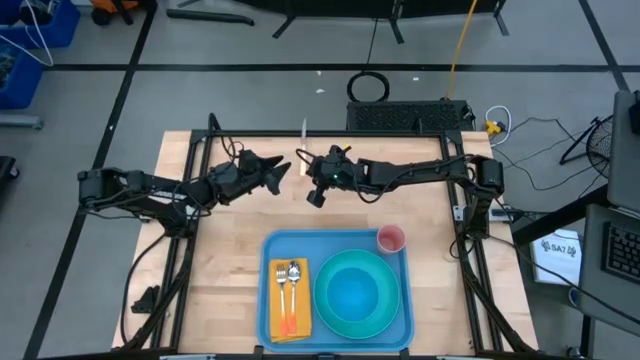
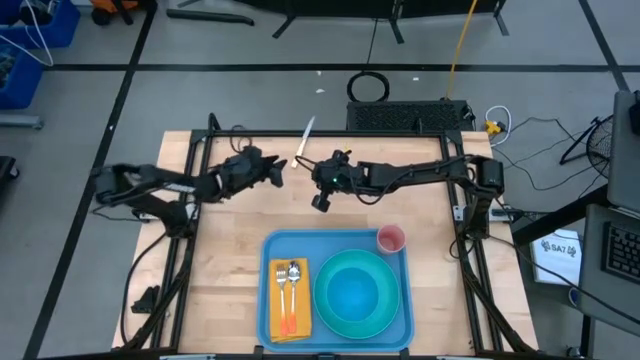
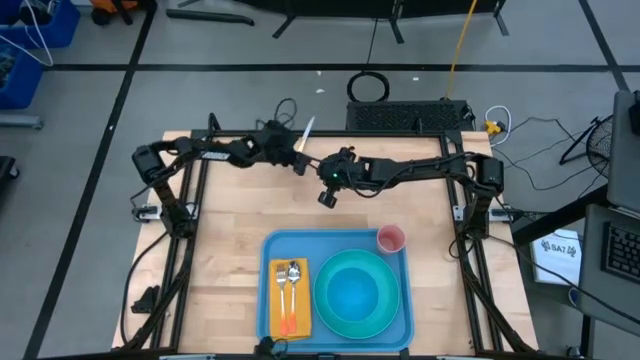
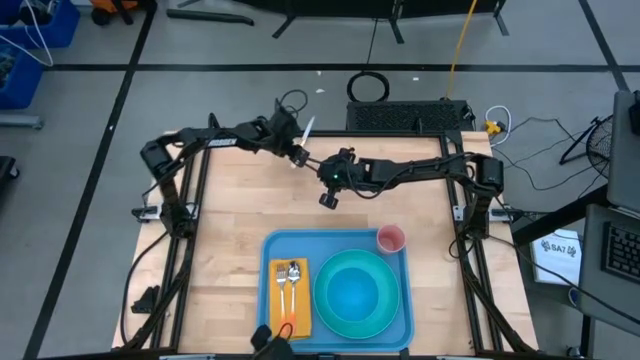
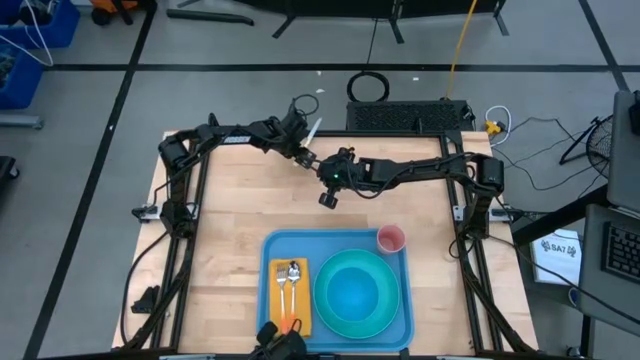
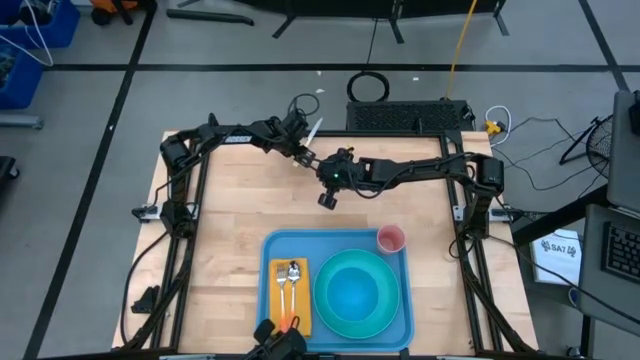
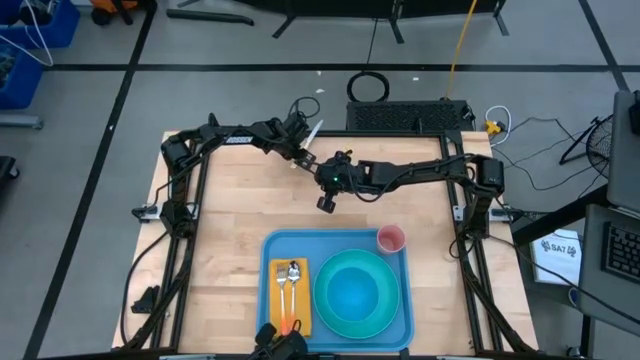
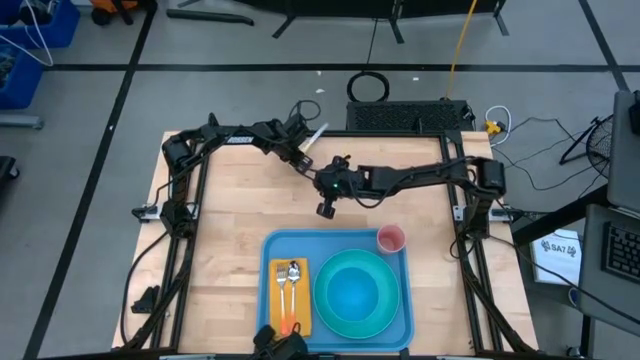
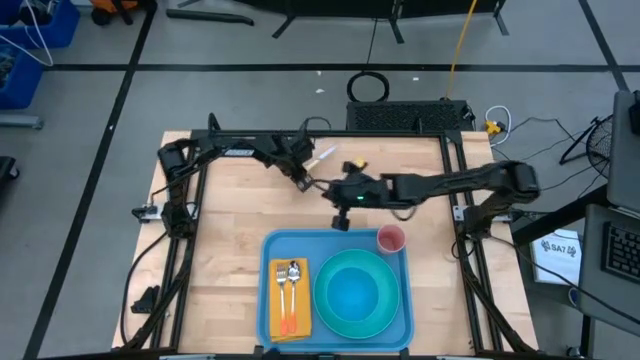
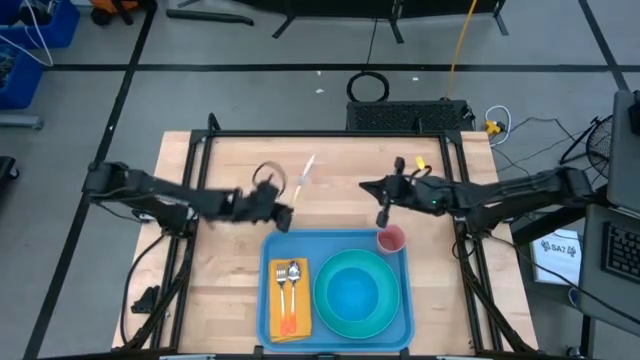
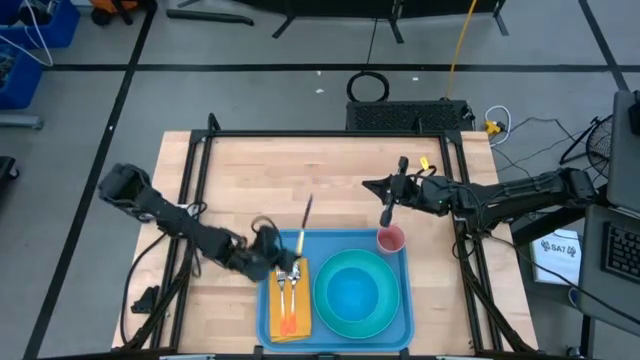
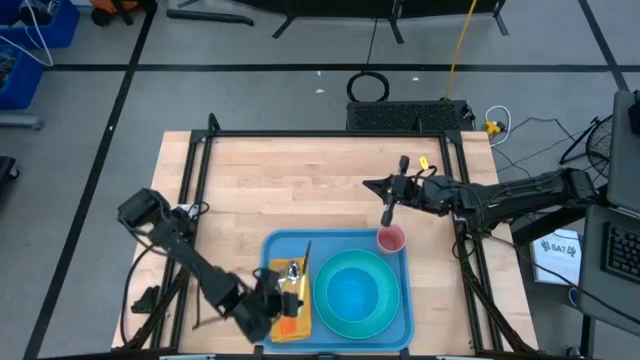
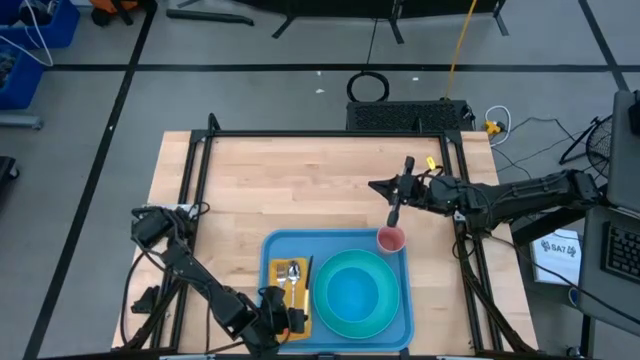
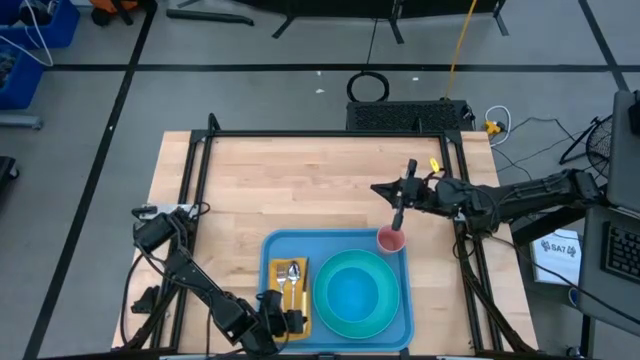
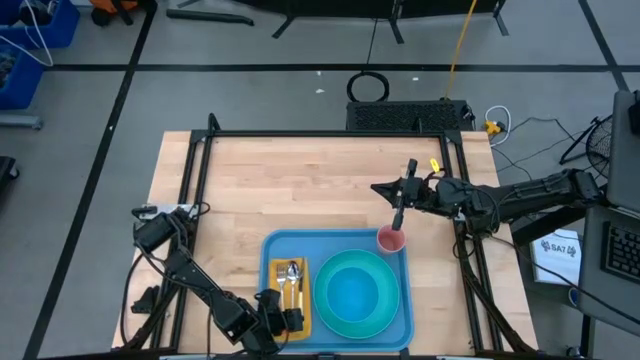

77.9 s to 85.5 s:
Task: Set up tray
Put the yellow table knife on the yellow table napkin beside the orange spoon

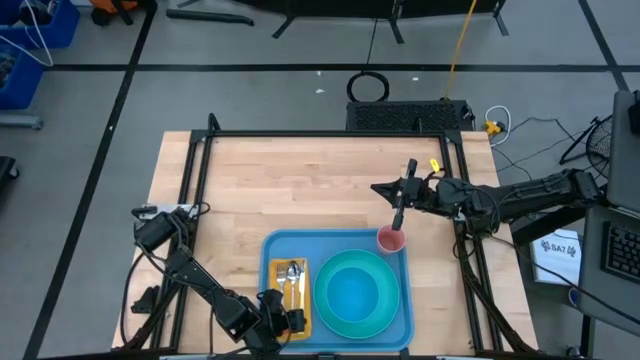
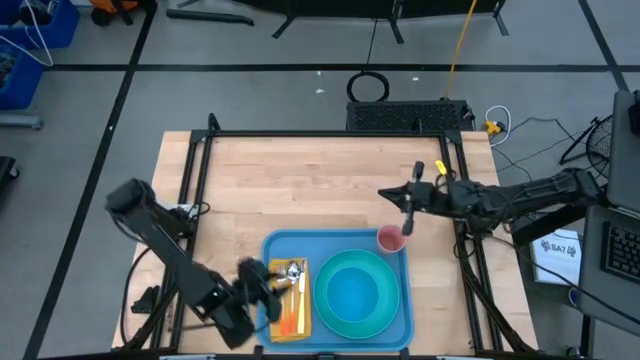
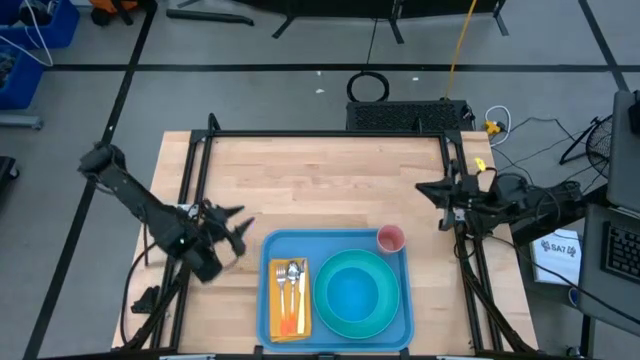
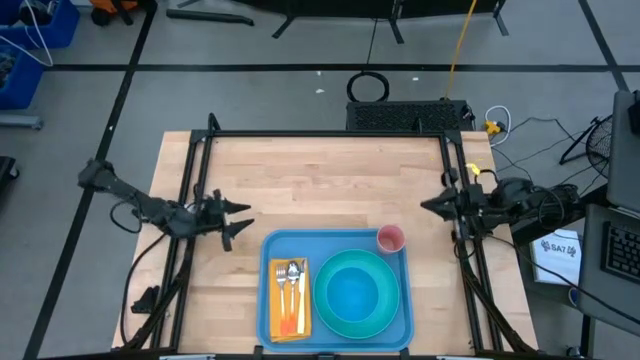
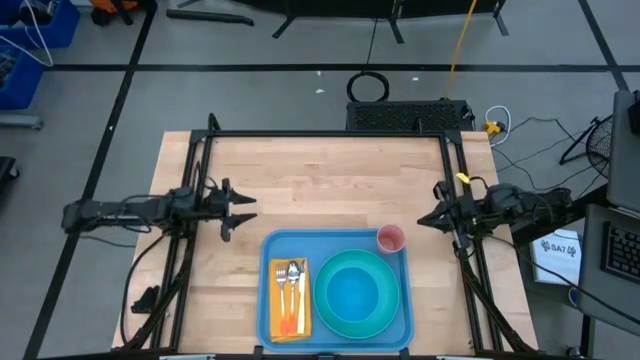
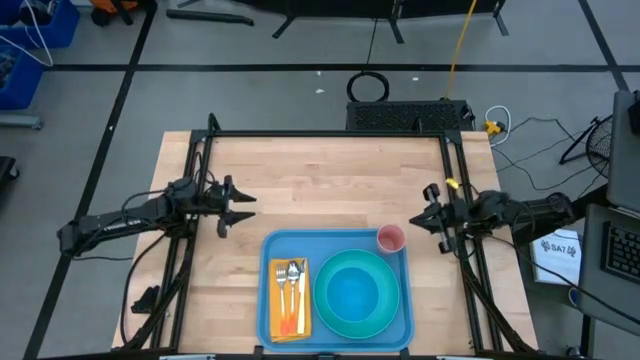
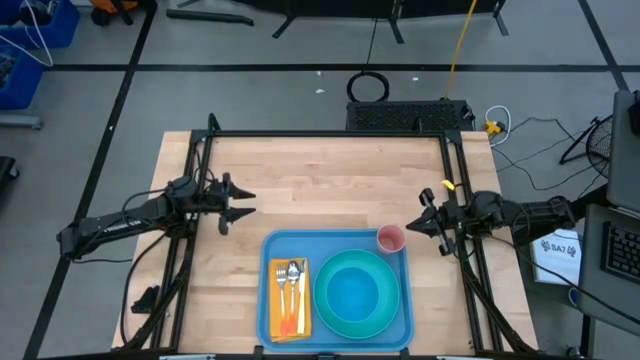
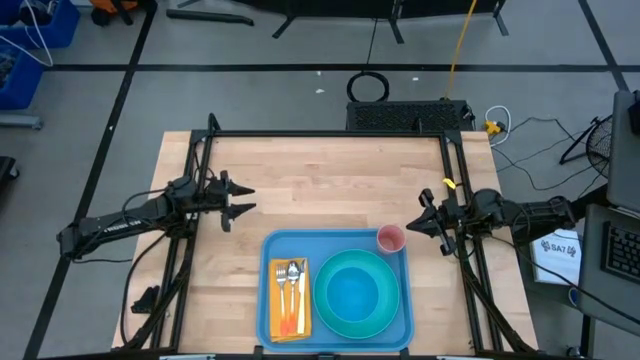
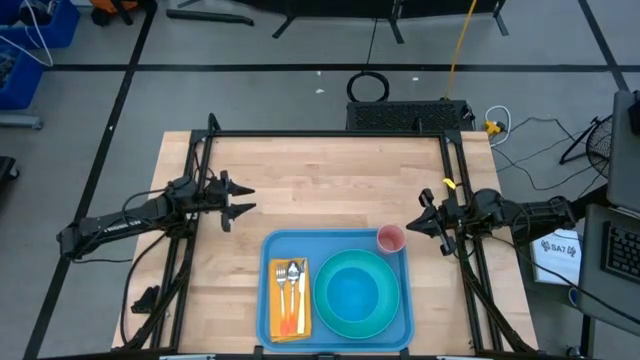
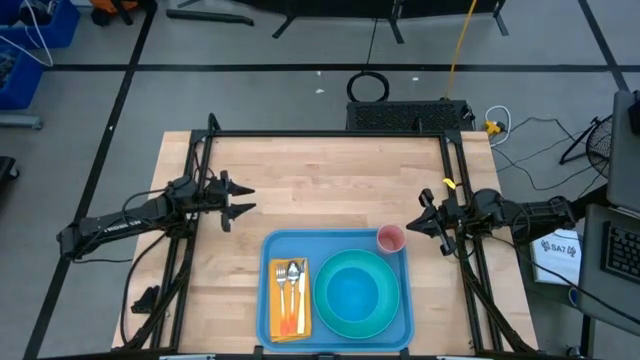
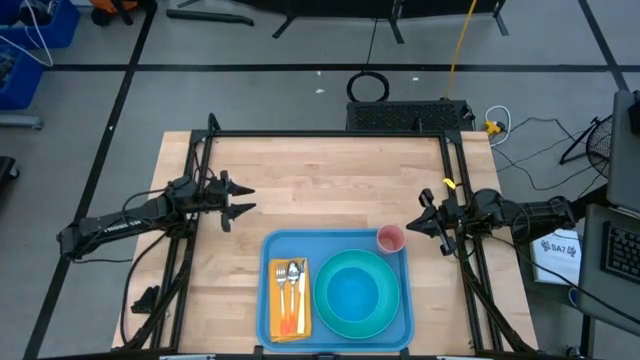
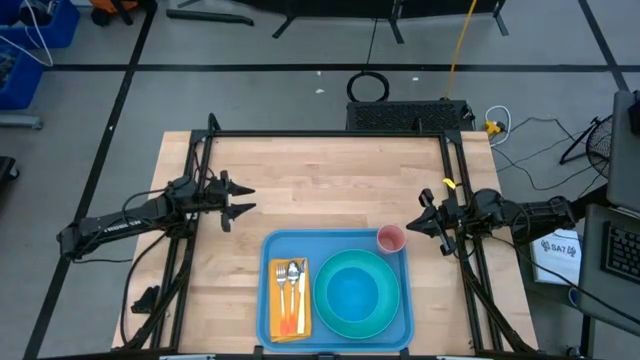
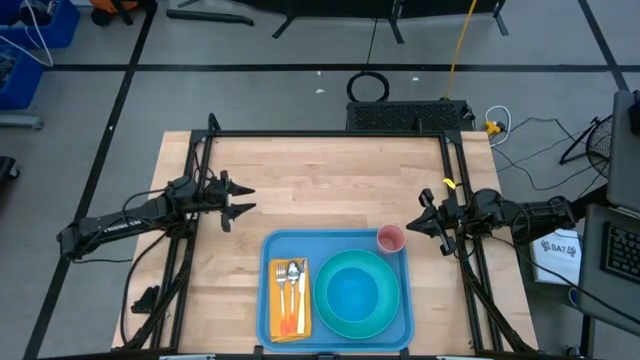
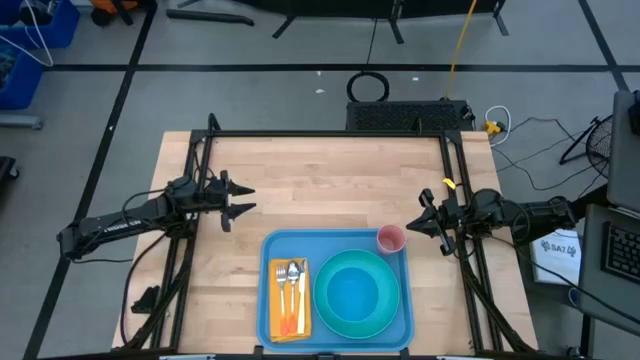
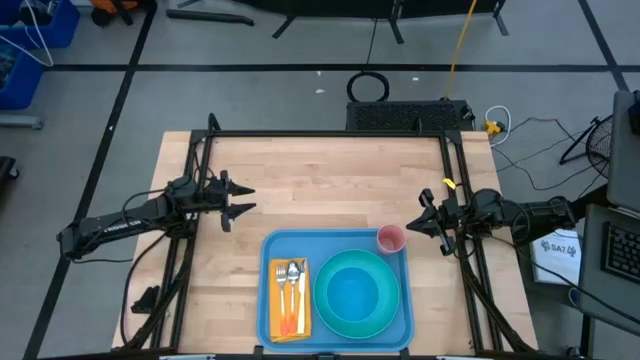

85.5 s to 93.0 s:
Return to Home Position

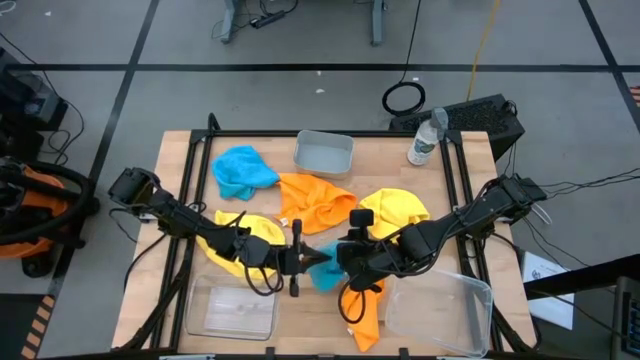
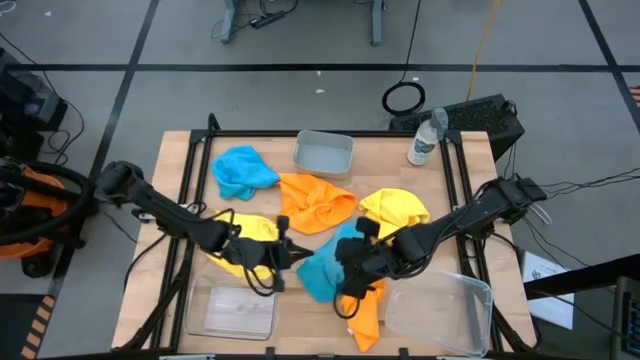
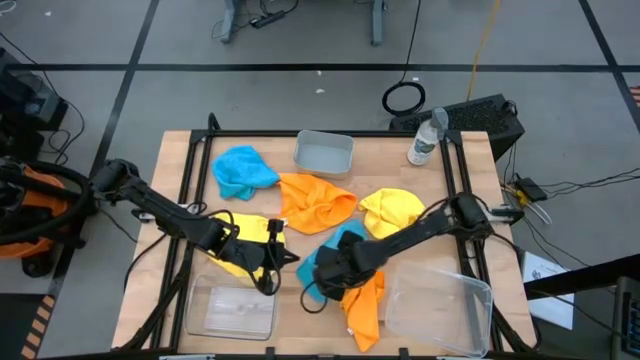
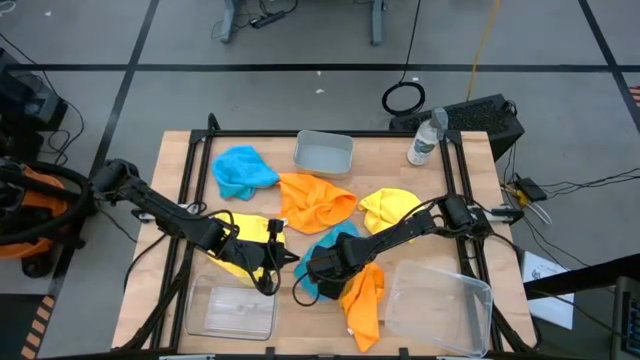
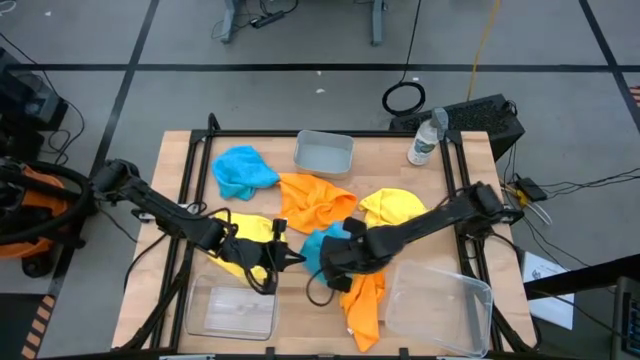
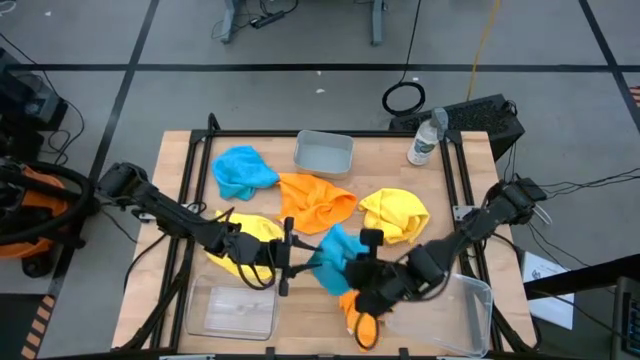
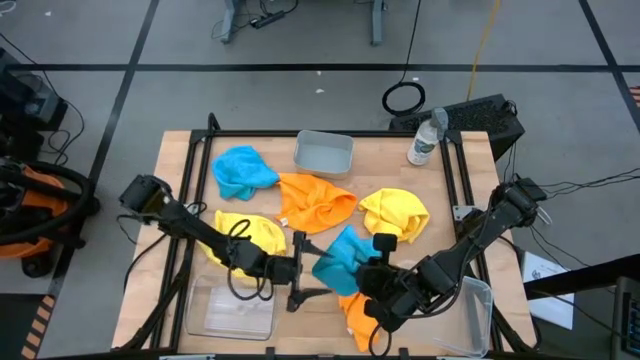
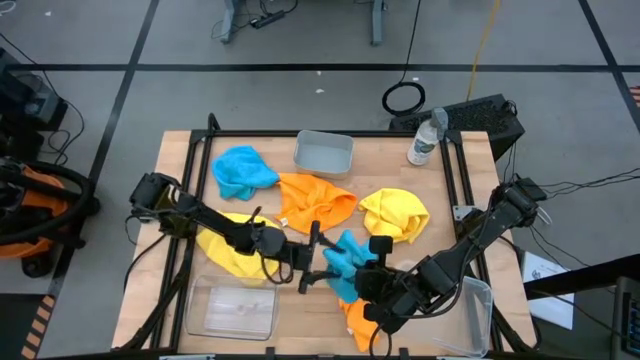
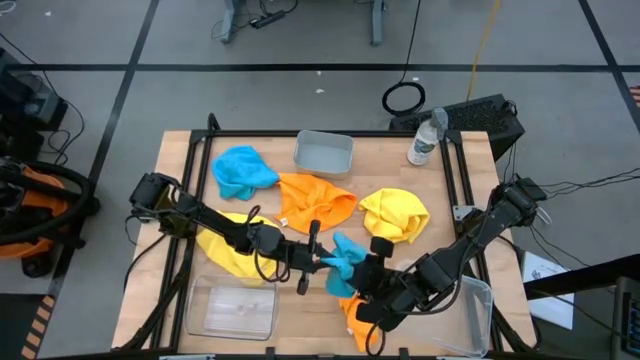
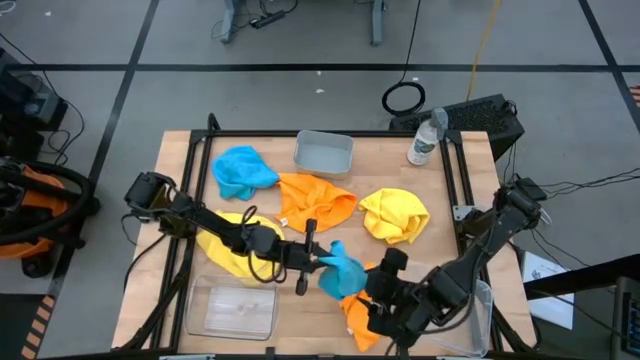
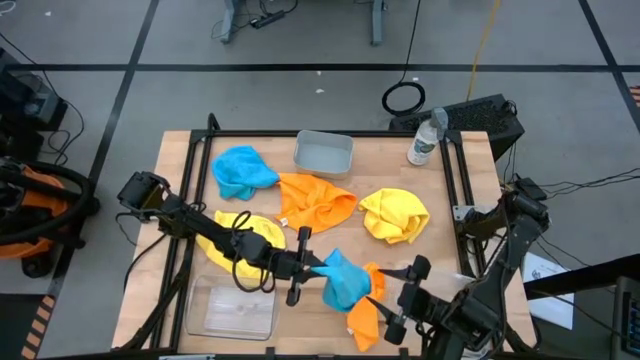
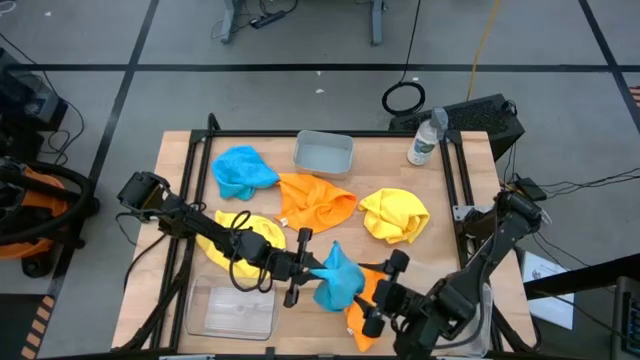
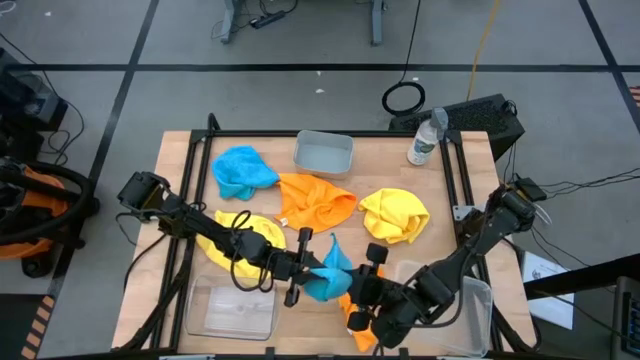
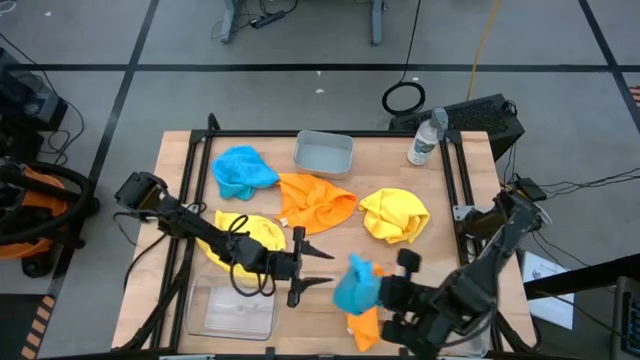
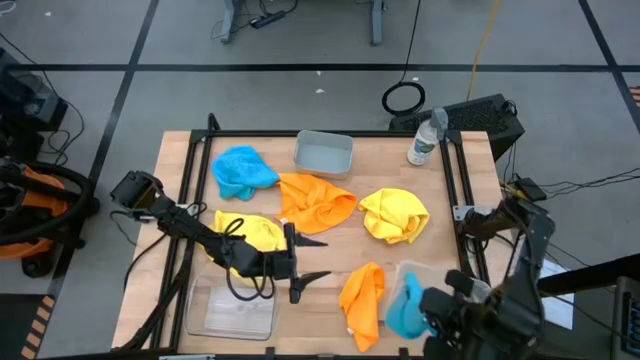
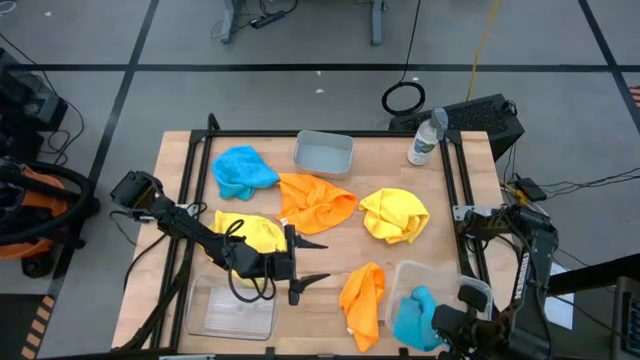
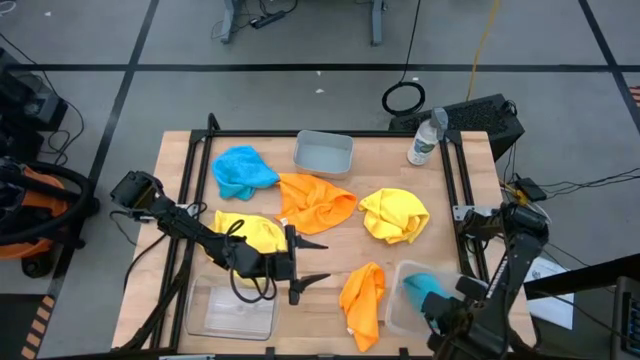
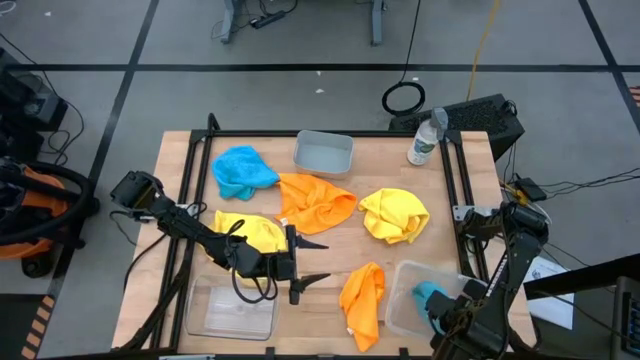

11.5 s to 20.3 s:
Task: Sort microfiber towel by color & place in baskets
Put the bottom blue microfiber cloth into the right transparent bin
